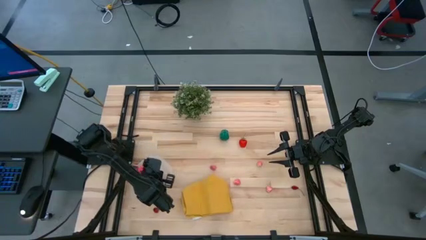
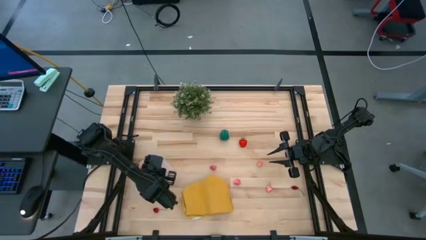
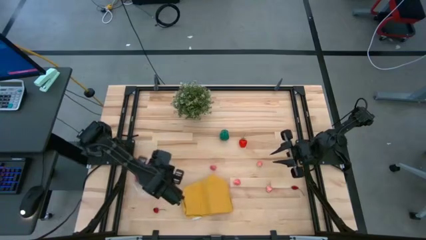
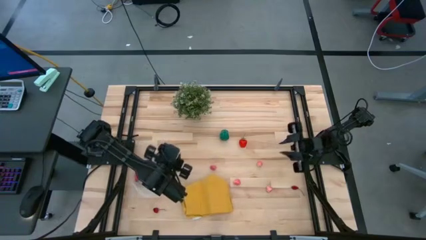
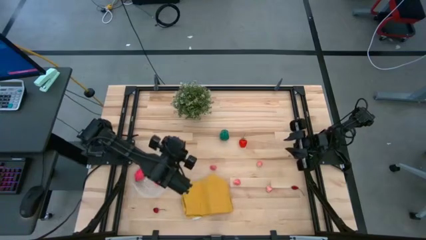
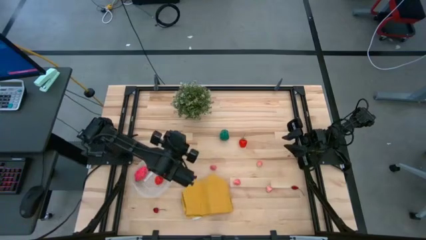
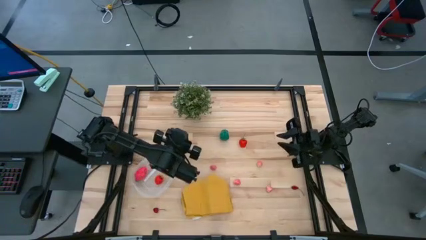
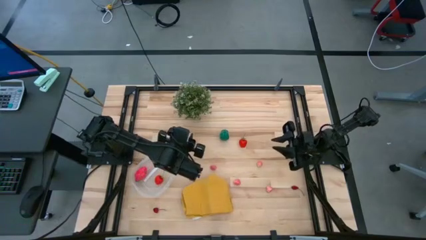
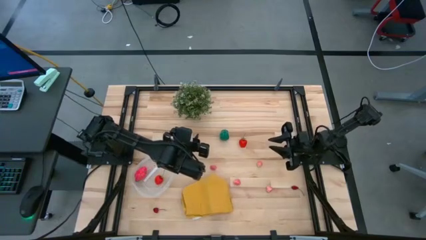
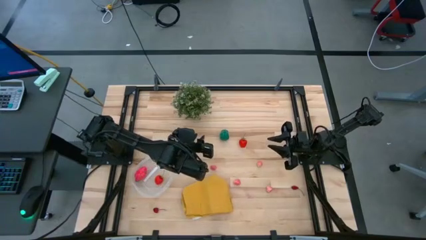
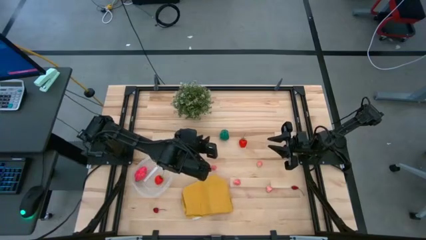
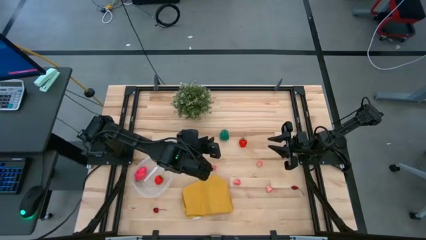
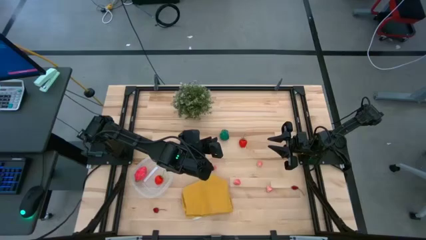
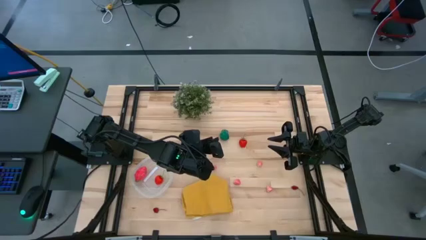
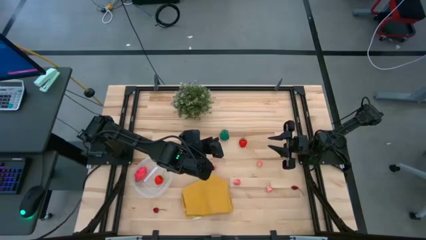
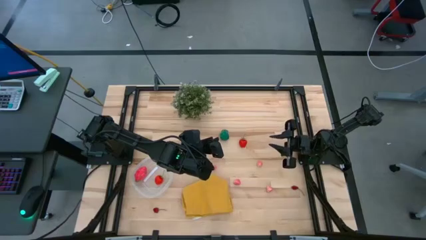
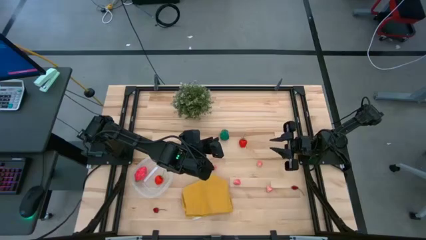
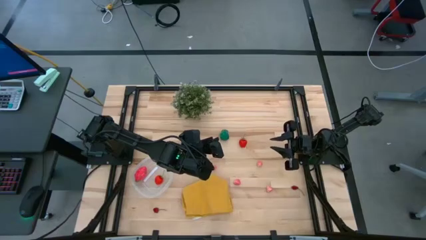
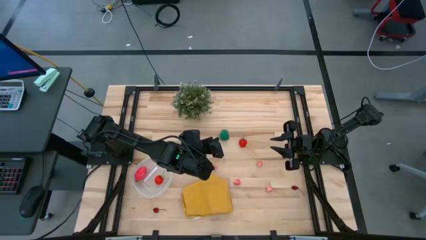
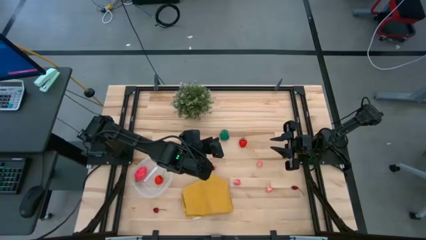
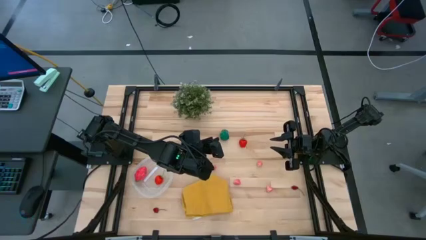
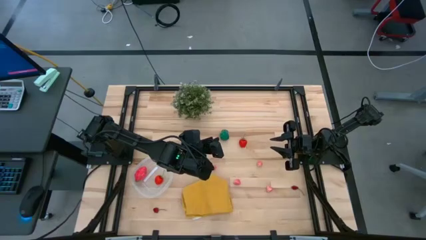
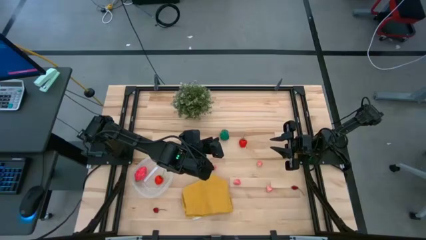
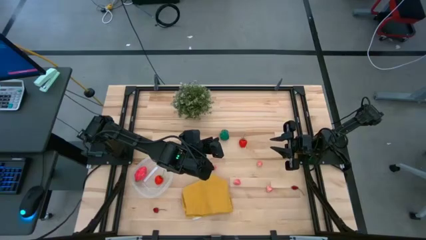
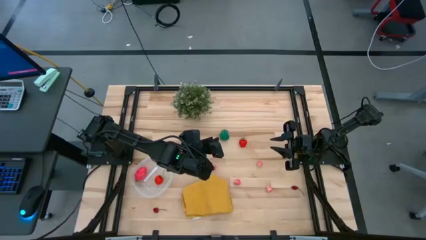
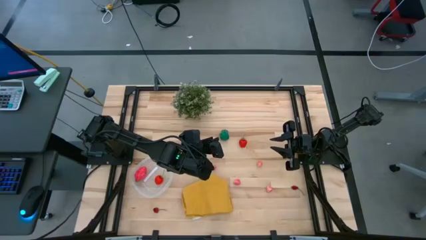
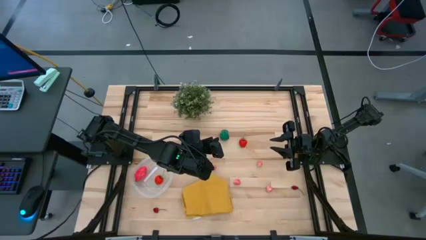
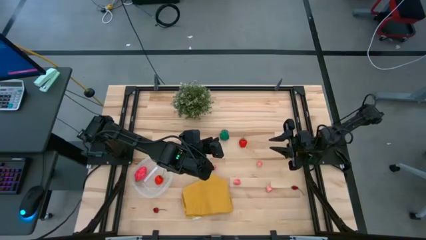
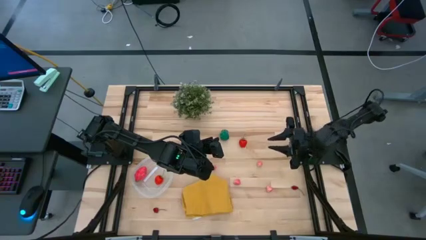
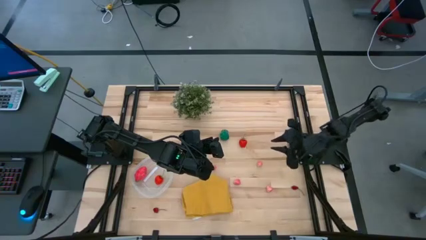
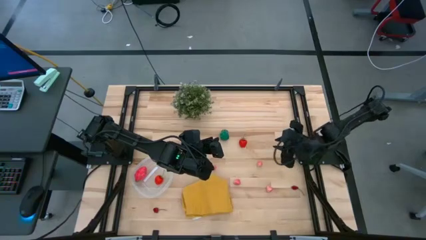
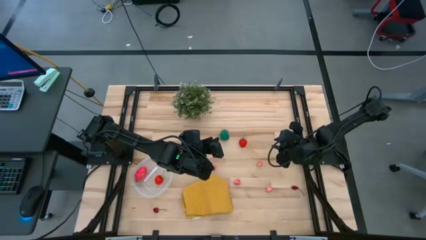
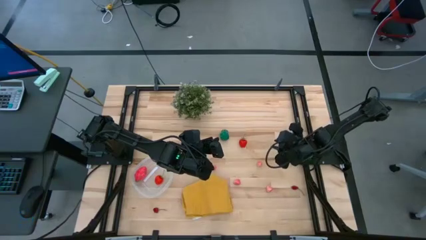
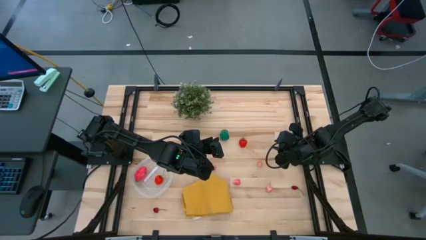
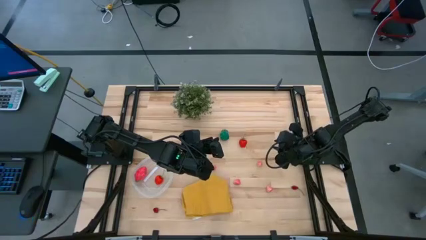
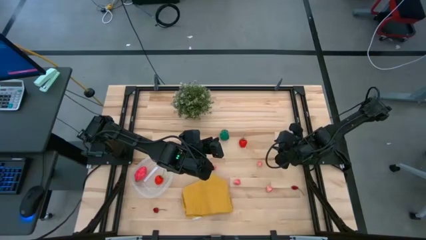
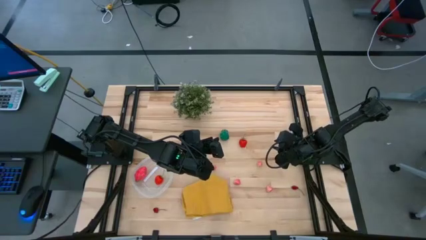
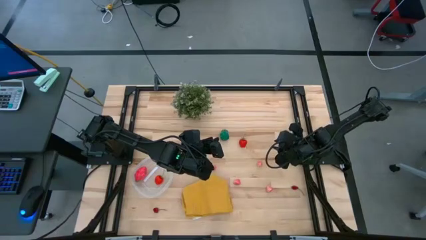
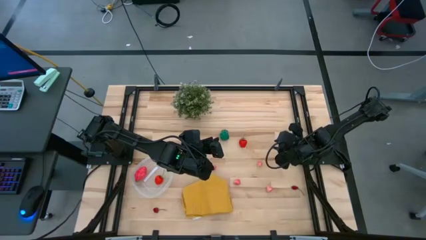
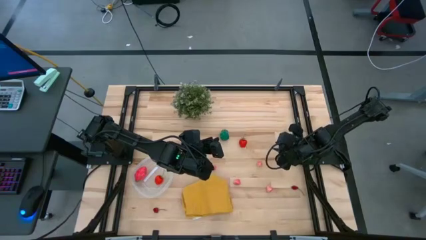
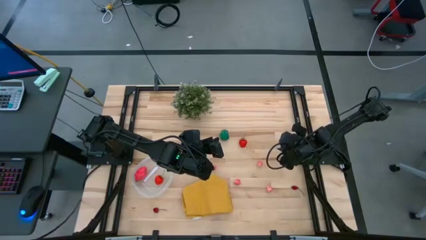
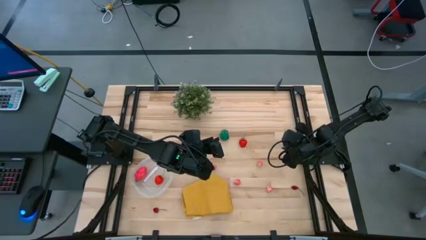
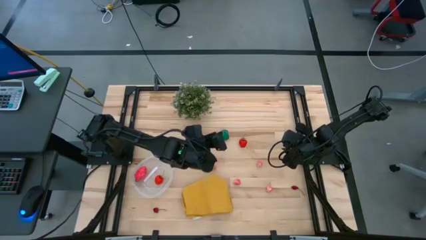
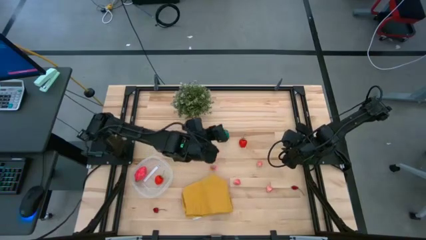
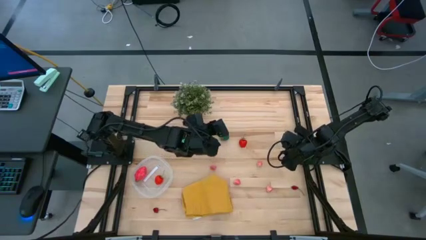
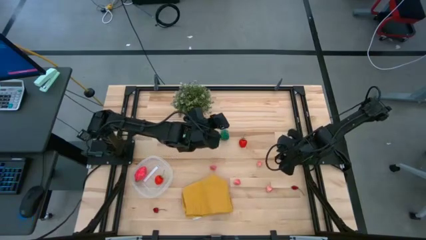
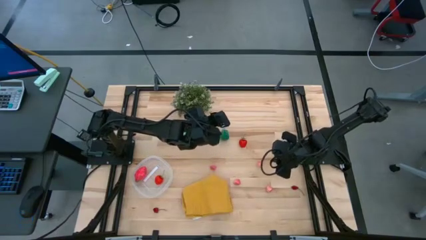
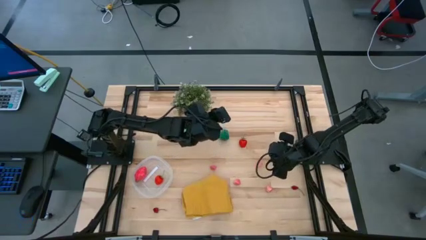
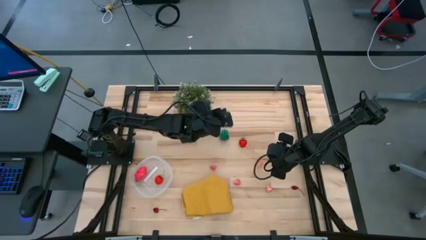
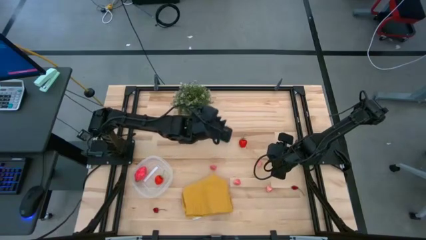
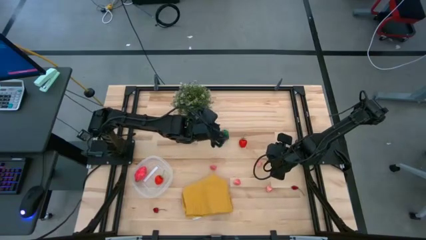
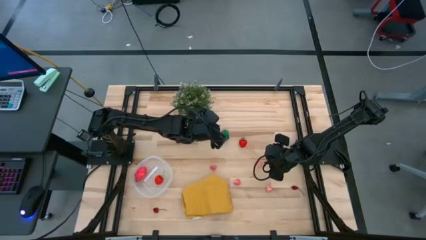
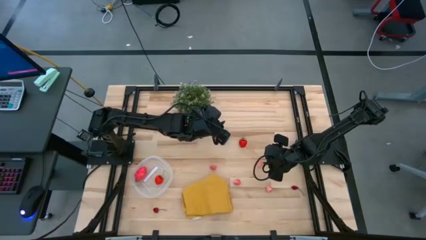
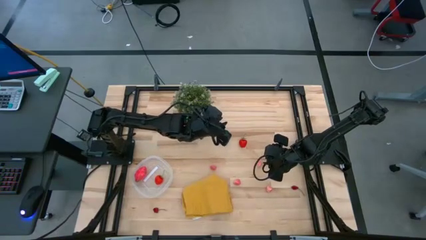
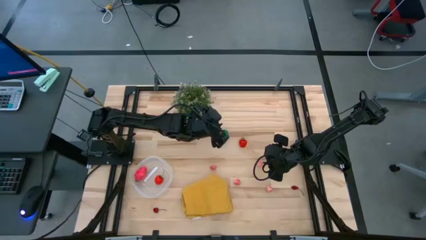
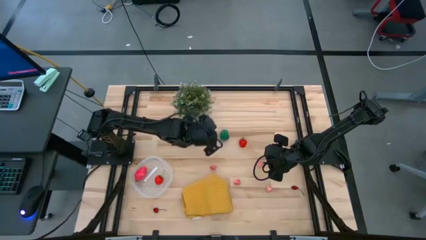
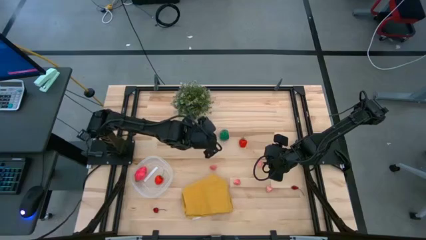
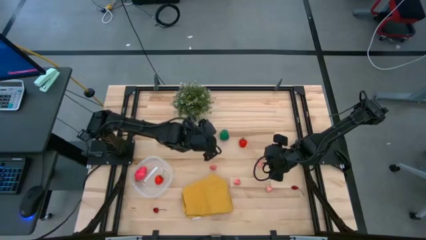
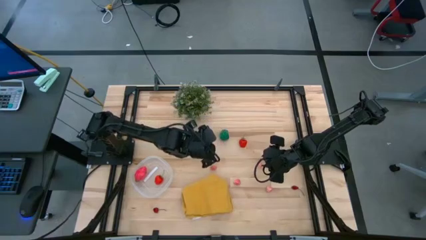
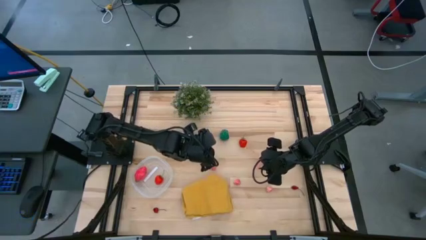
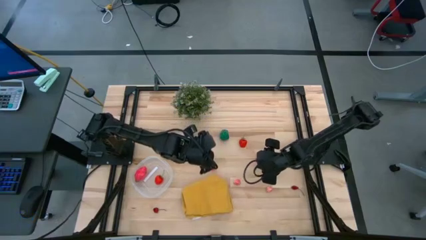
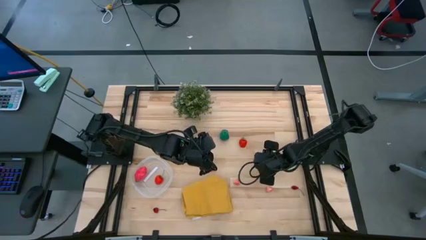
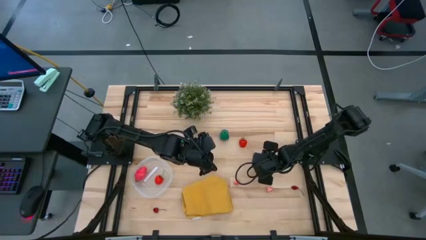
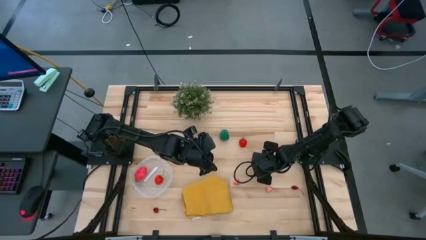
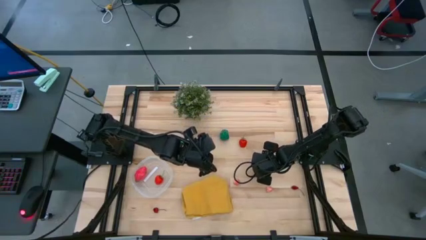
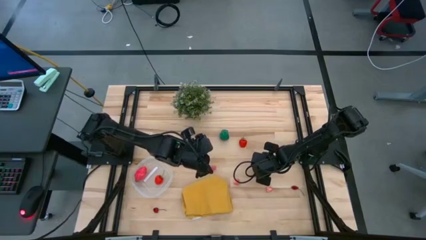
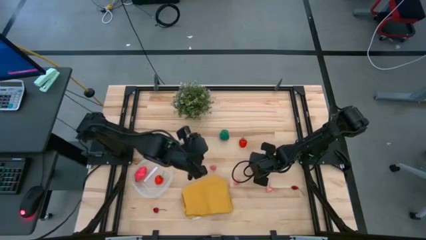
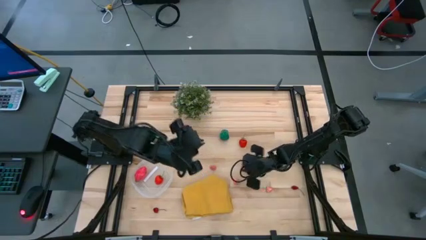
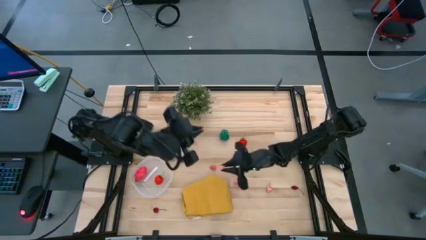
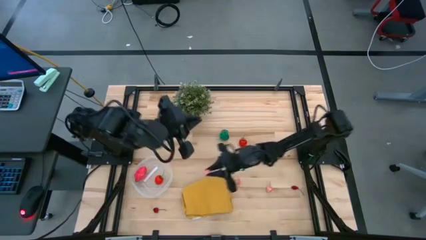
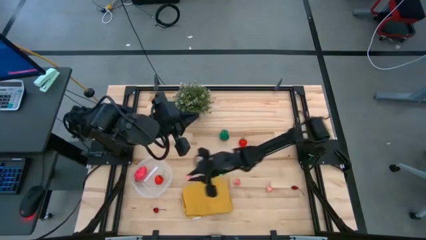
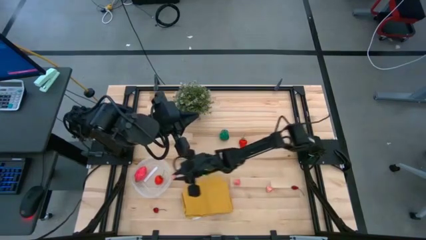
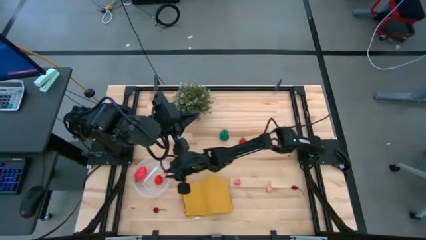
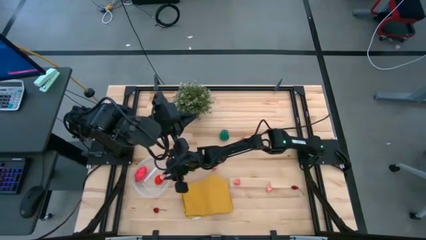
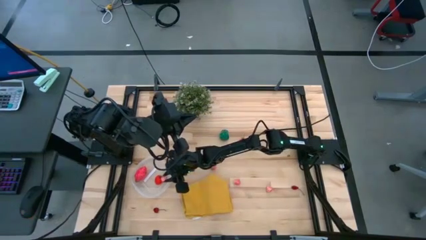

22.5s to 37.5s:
Task: Pick and placing Produce into tupperware
Put the peach into the transparent bin
